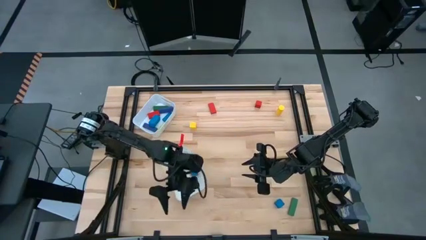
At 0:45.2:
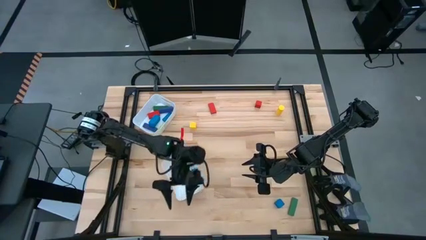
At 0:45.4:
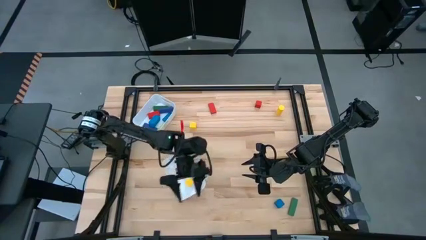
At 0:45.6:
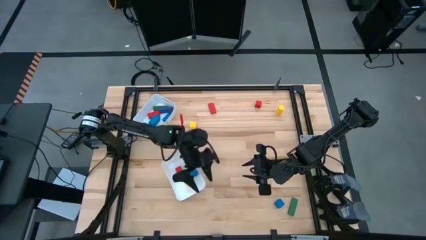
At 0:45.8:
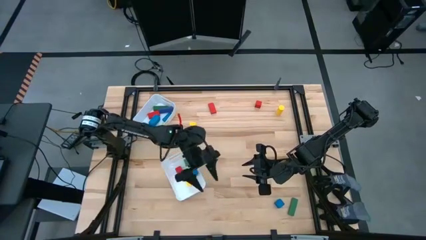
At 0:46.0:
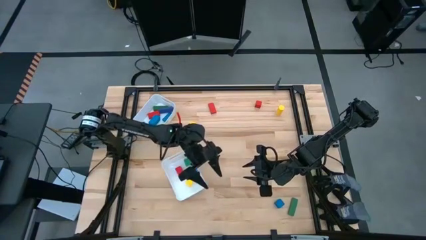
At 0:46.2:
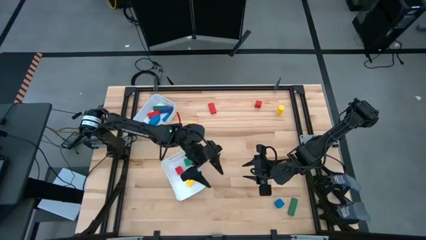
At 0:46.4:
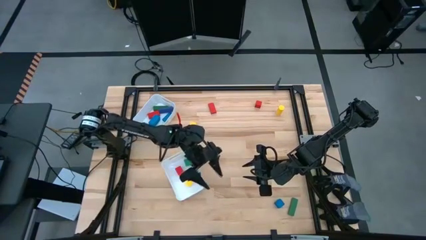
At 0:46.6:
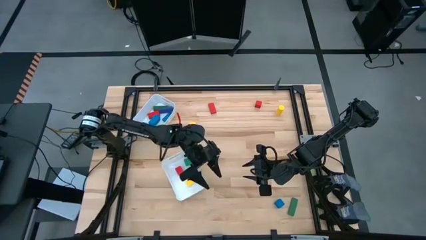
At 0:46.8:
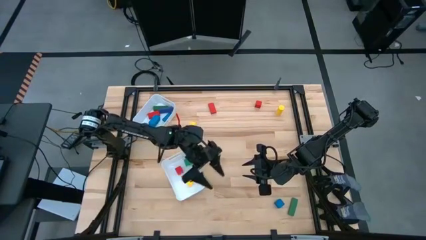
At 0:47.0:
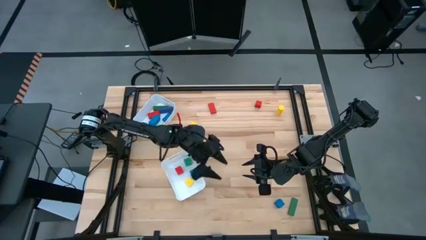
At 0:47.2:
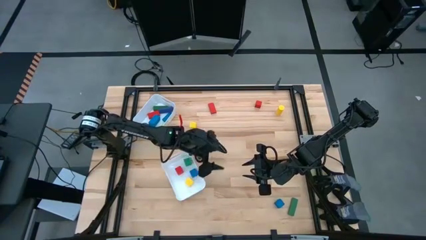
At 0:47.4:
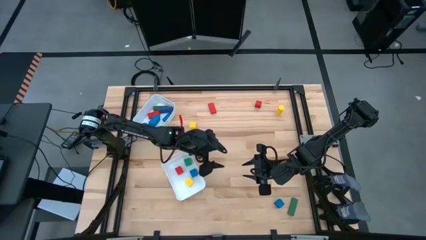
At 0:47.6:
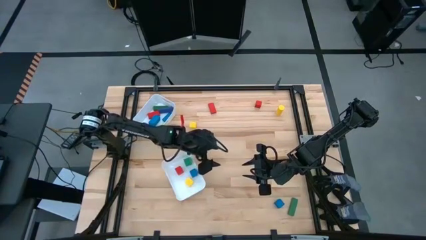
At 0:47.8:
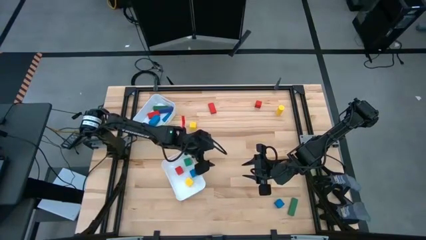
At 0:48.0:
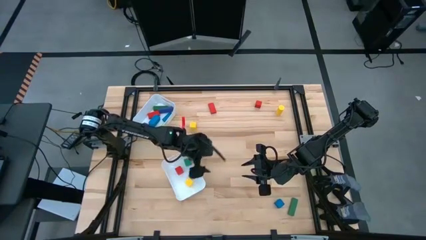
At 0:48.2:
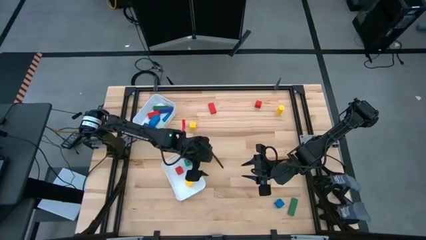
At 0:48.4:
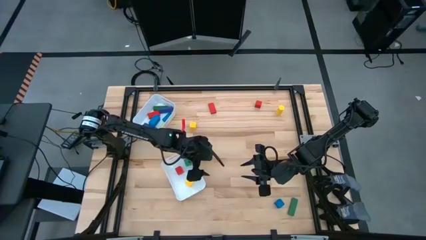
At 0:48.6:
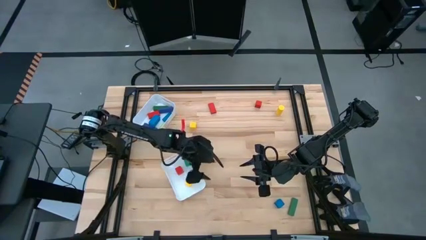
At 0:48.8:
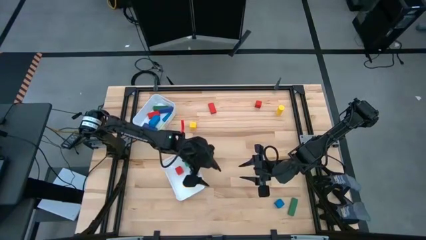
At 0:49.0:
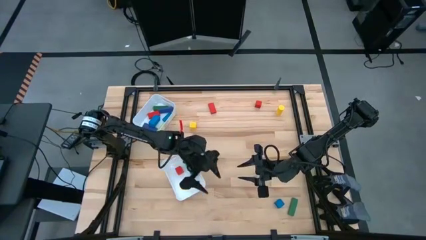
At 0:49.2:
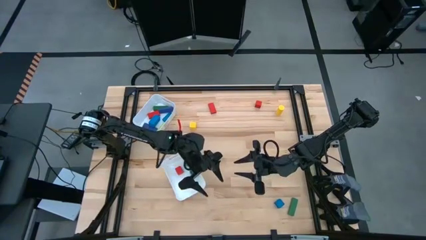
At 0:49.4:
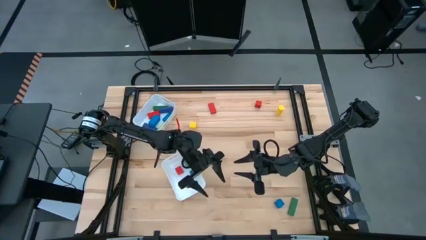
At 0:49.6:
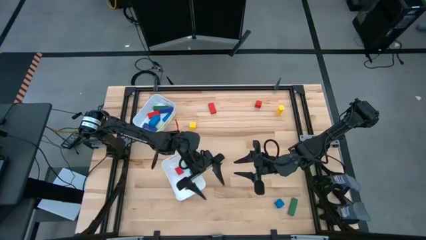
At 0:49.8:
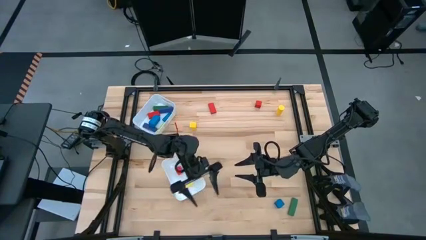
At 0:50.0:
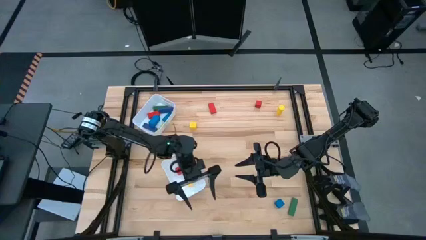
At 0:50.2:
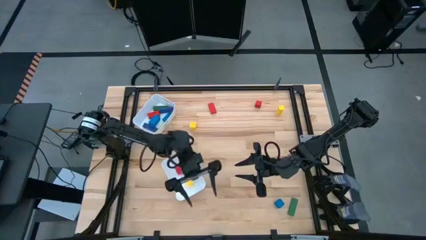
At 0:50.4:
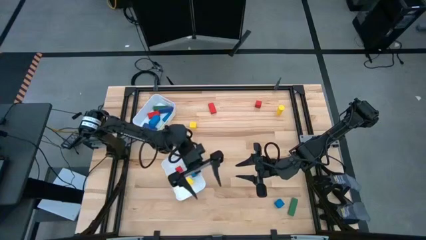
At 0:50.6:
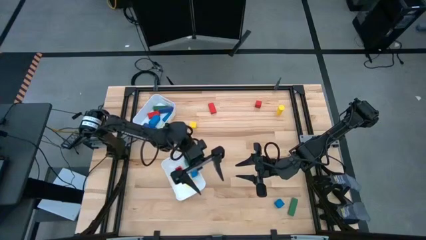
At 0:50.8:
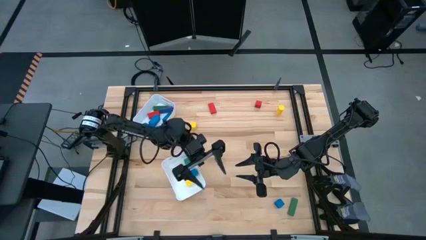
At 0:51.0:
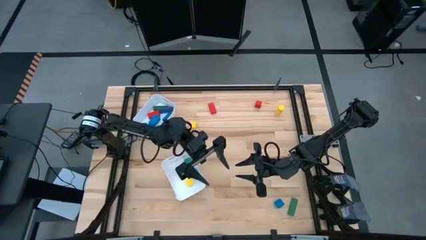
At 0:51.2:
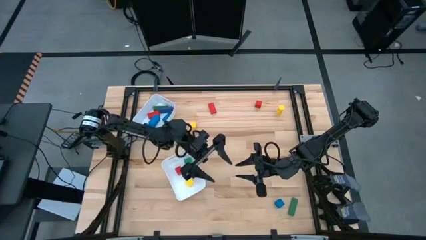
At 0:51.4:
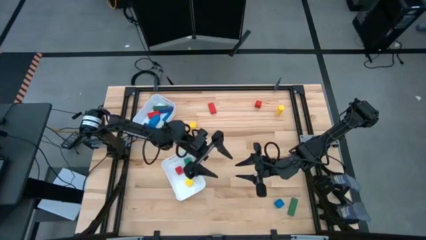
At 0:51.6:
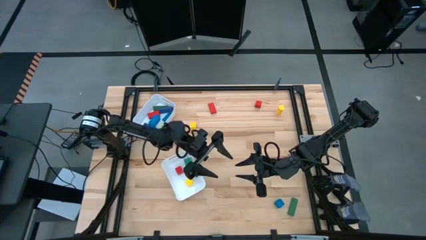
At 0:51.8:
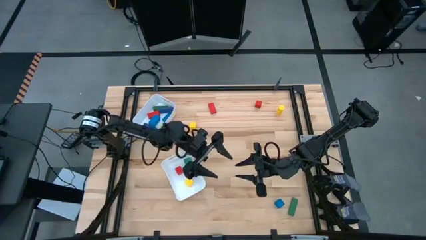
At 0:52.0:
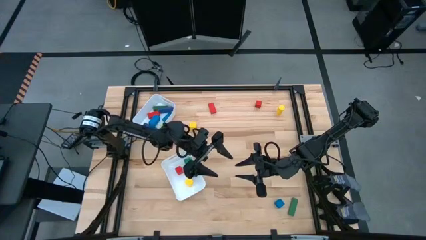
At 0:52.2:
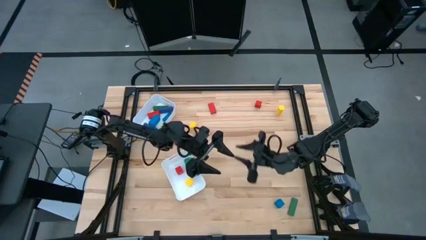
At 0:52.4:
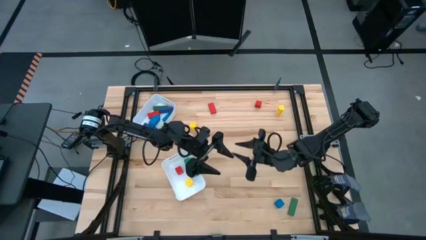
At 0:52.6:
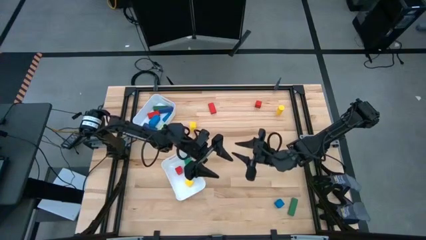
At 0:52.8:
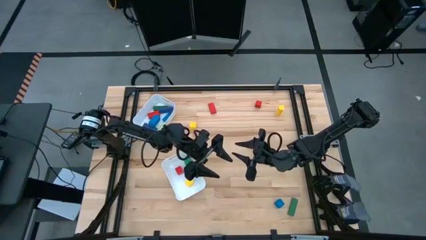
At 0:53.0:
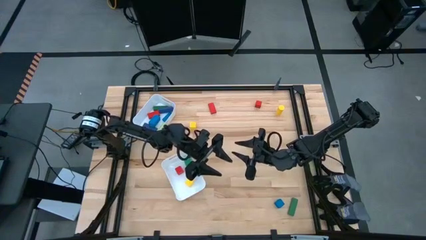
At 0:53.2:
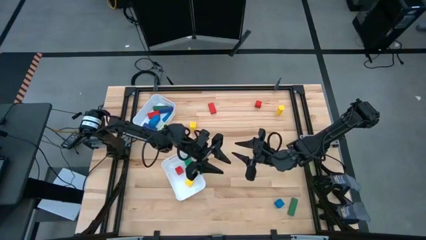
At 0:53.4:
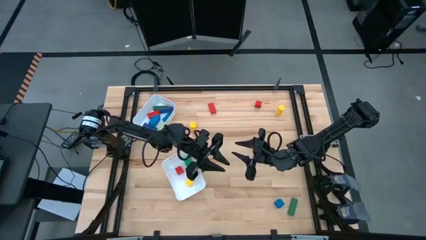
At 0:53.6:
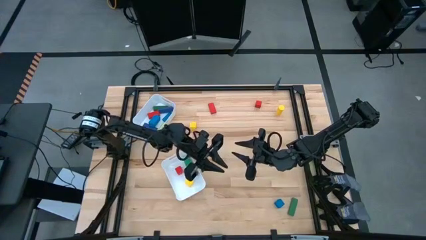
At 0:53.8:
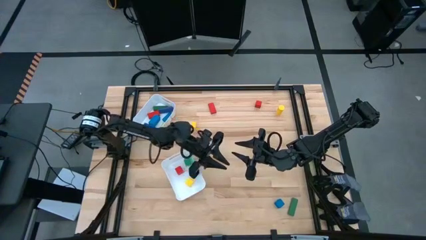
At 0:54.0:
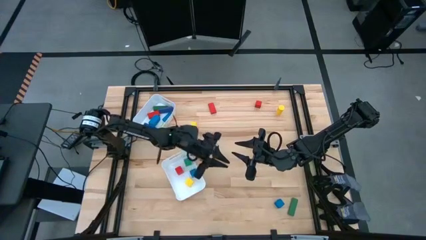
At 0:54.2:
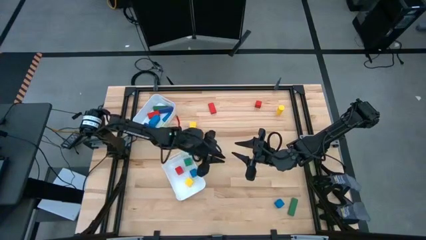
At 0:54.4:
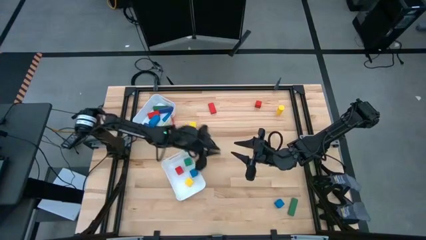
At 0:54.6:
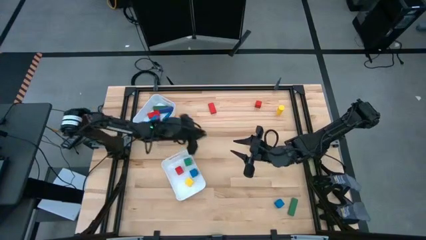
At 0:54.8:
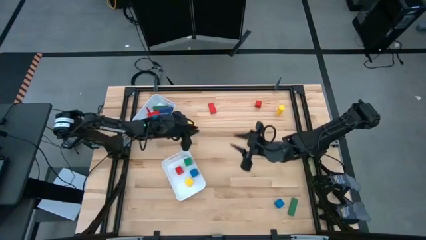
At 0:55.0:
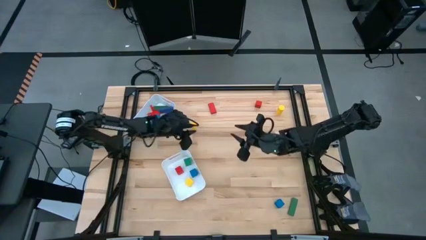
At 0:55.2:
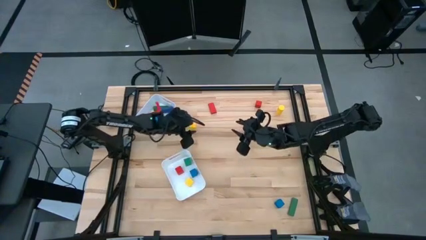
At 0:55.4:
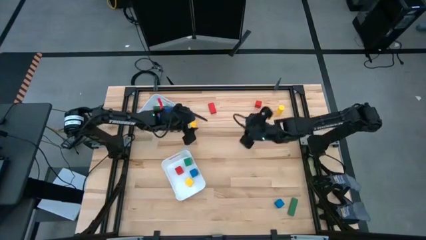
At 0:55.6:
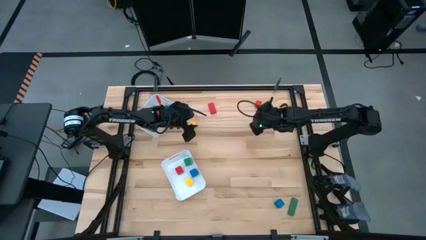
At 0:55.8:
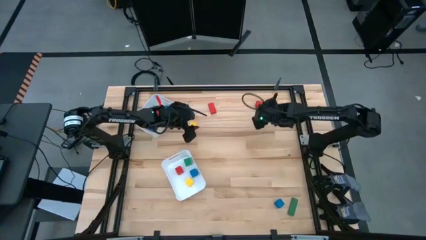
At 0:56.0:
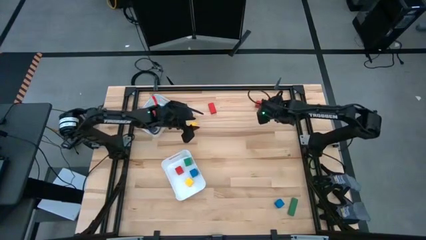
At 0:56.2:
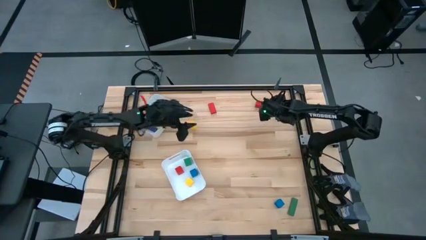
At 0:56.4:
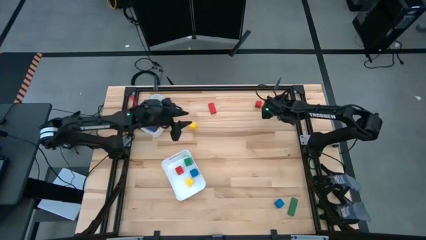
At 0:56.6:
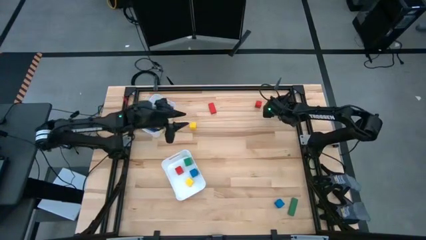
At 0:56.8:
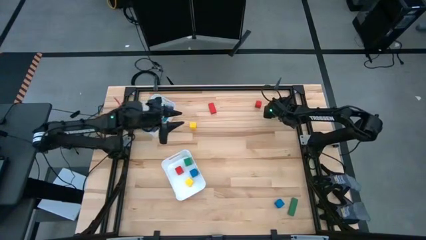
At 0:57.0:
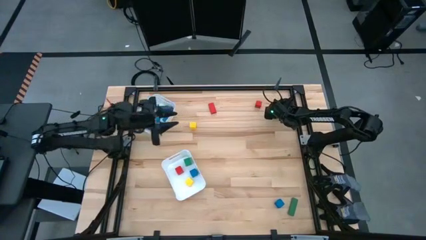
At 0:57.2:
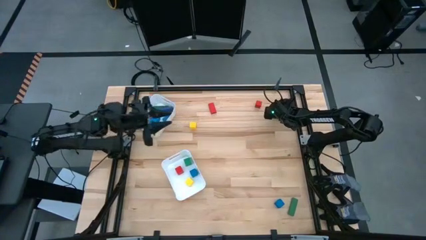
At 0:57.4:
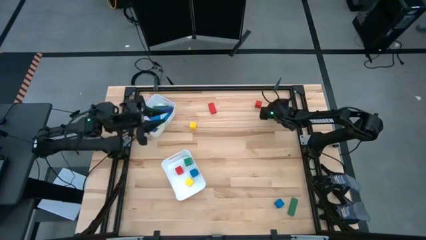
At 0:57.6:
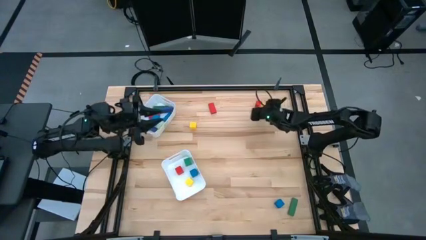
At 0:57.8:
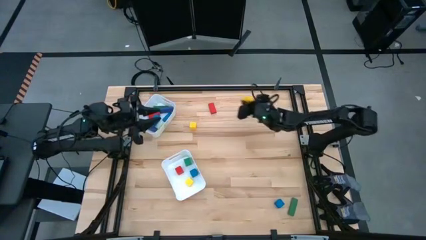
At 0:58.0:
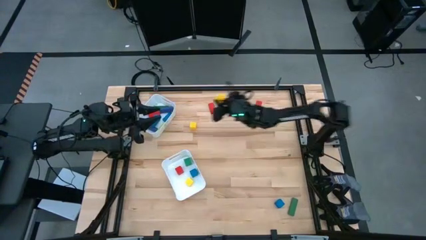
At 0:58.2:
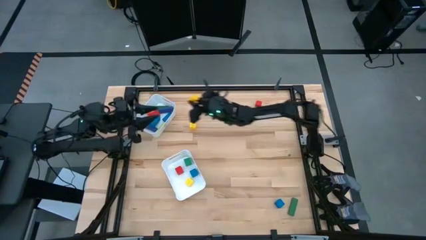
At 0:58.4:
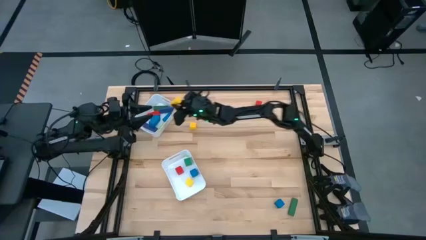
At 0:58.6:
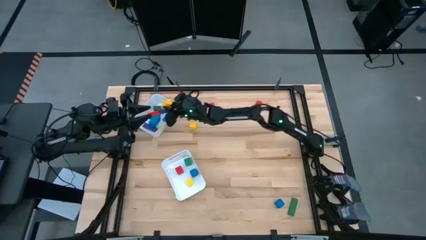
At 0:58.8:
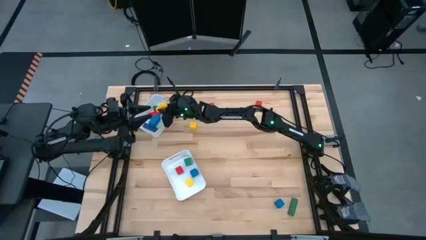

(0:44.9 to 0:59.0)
Task: Sort blocks by size
Put the yellow large block into the top white bin

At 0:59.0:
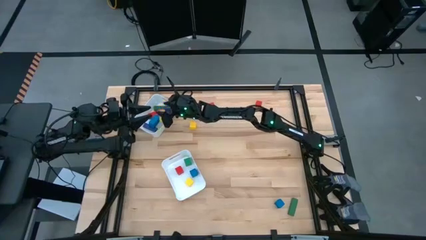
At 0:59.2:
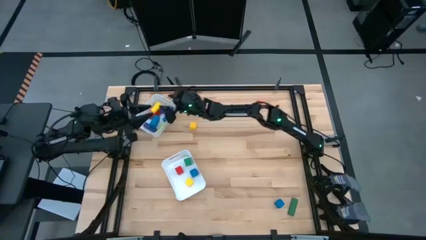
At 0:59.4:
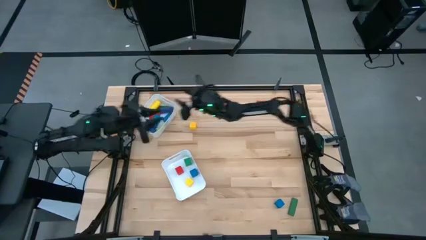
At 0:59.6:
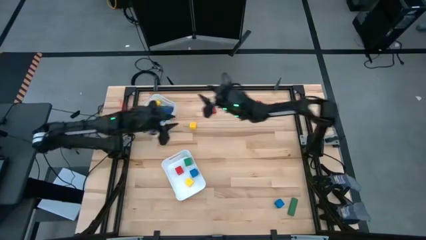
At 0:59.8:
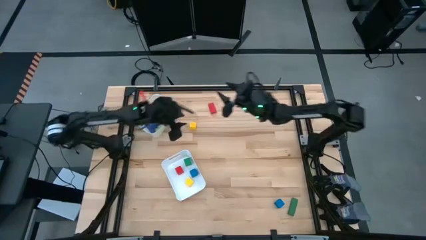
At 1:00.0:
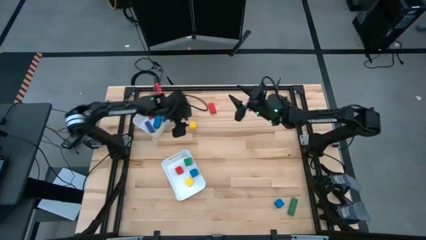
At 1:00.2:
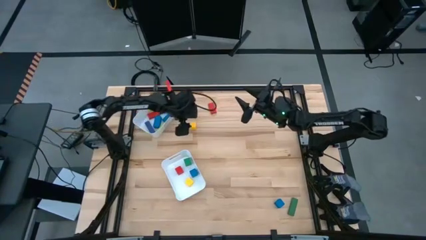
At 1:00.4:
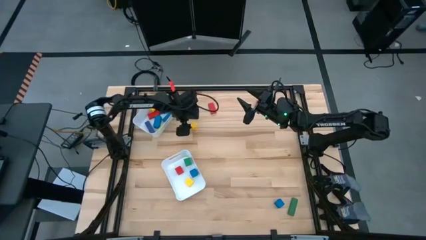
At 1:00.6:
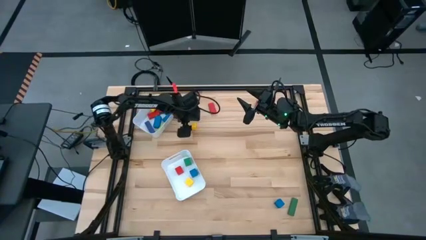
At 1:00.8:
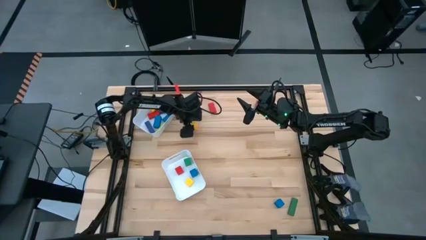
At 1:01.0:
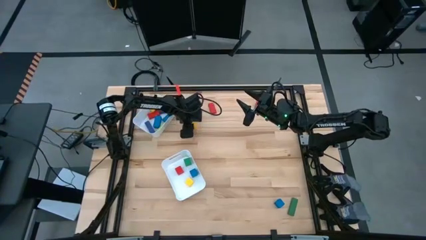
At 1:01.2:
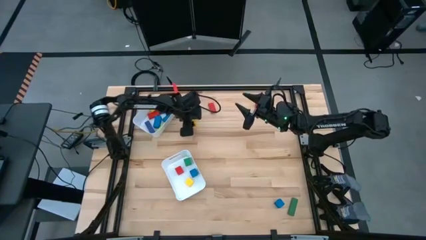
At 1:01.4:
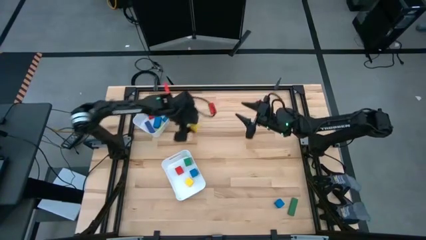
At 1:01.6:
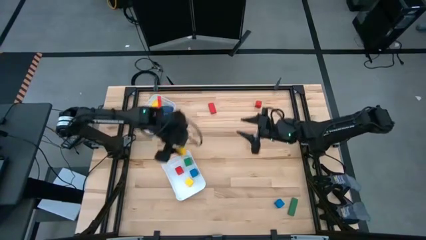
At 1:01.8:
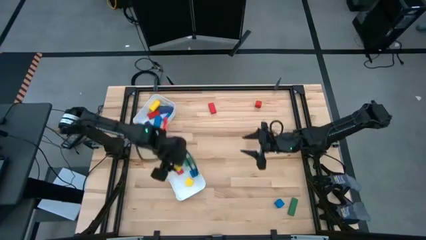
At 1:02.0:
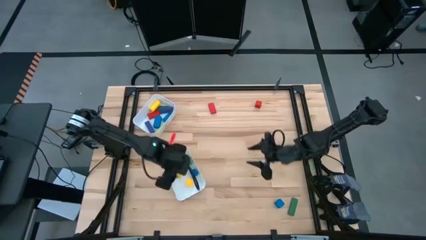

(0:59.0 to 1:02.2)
Put the yellow small block into the bottom white bin
